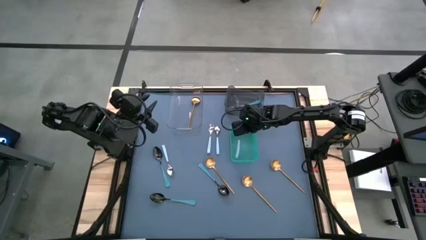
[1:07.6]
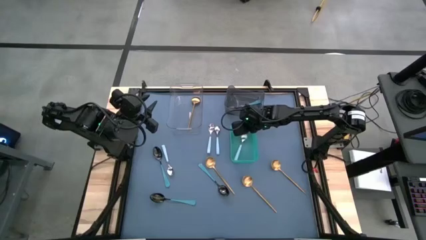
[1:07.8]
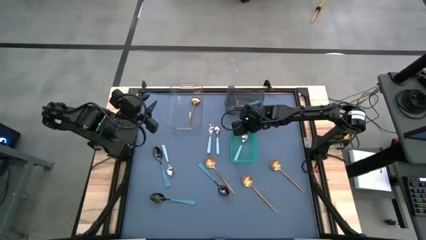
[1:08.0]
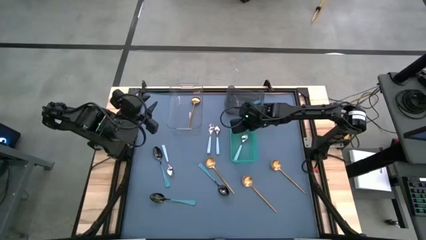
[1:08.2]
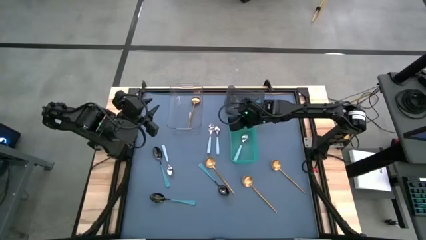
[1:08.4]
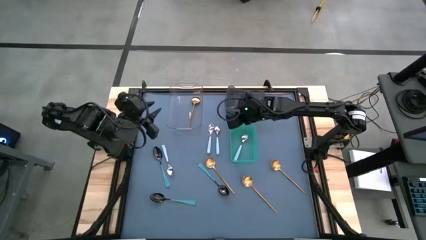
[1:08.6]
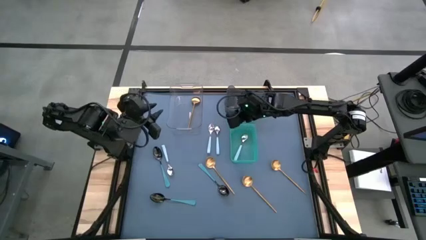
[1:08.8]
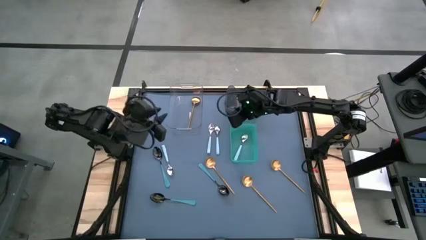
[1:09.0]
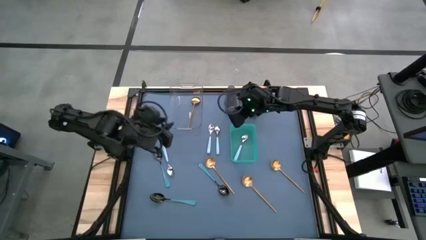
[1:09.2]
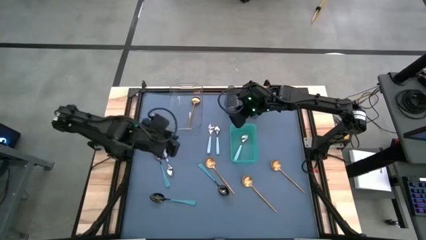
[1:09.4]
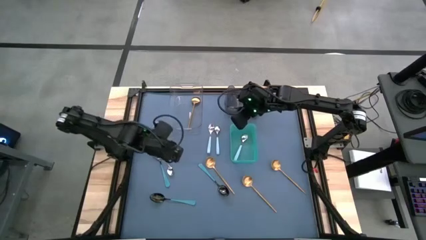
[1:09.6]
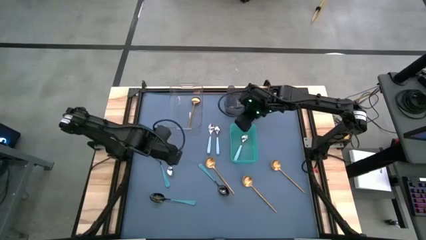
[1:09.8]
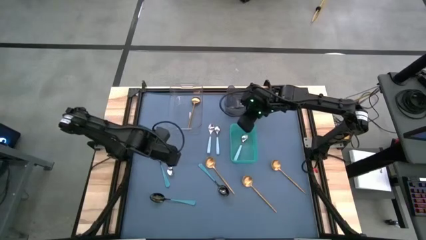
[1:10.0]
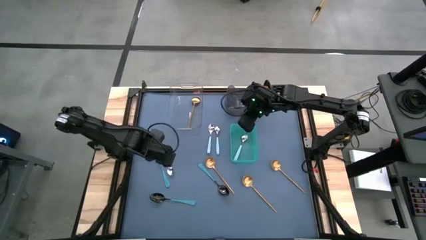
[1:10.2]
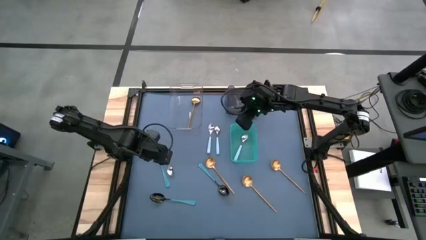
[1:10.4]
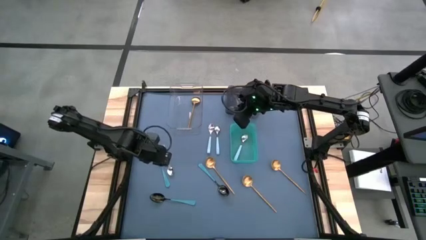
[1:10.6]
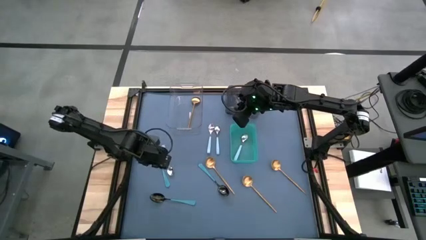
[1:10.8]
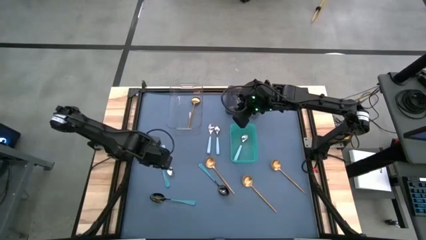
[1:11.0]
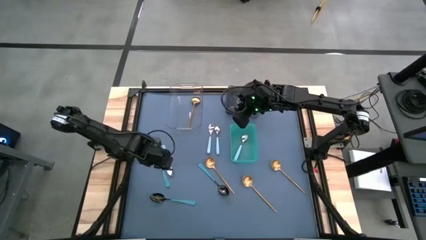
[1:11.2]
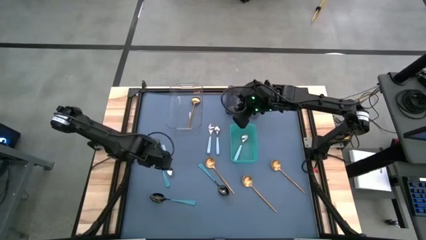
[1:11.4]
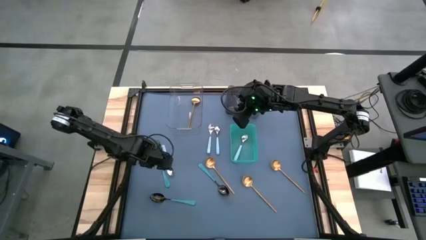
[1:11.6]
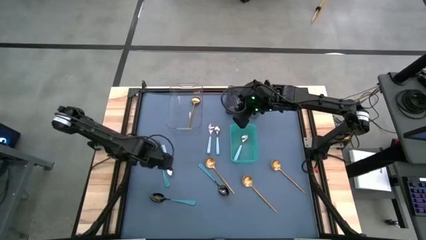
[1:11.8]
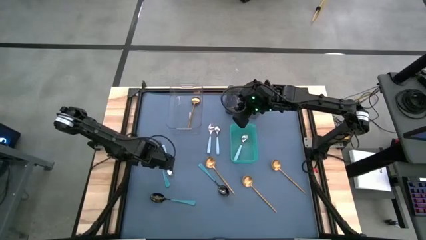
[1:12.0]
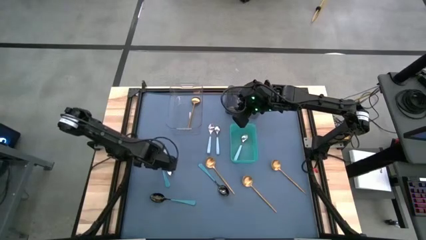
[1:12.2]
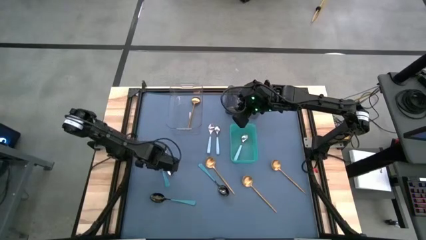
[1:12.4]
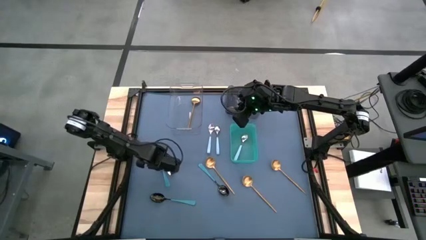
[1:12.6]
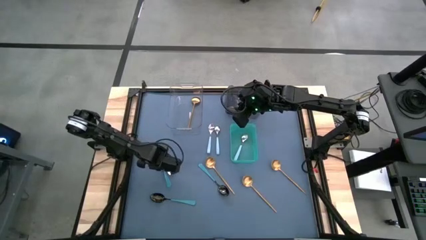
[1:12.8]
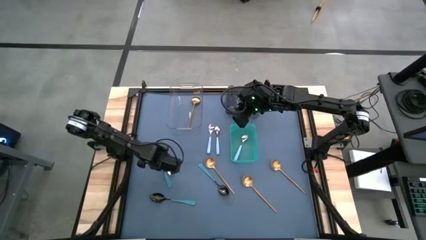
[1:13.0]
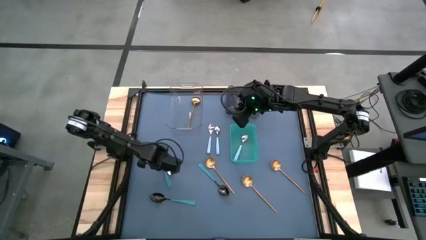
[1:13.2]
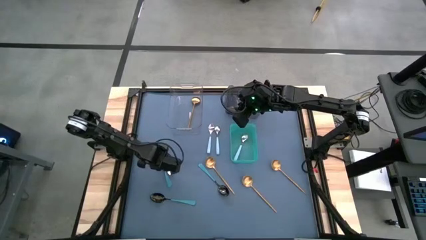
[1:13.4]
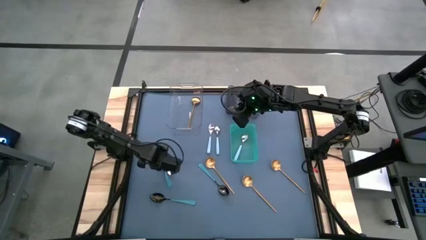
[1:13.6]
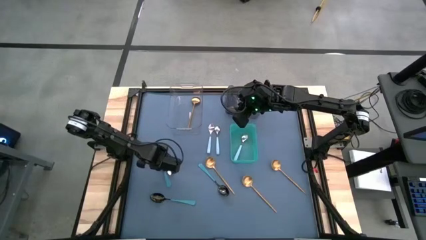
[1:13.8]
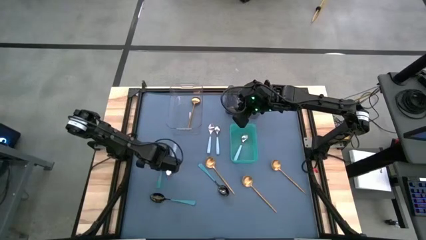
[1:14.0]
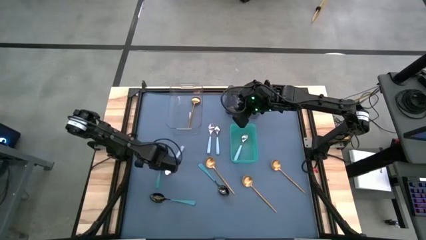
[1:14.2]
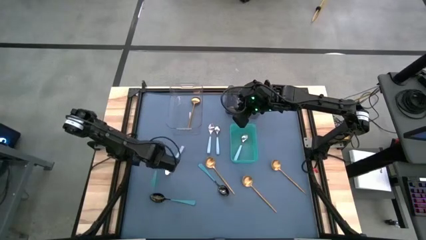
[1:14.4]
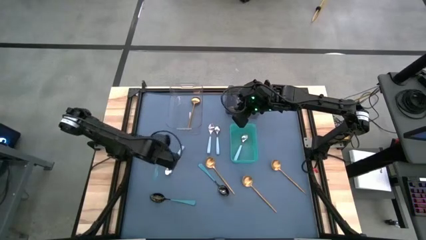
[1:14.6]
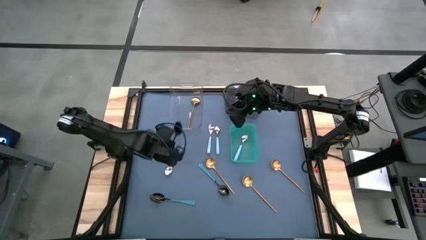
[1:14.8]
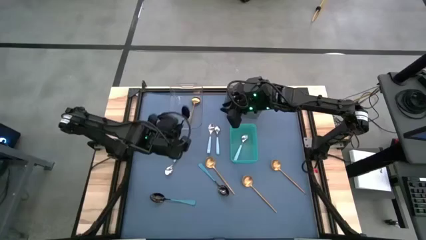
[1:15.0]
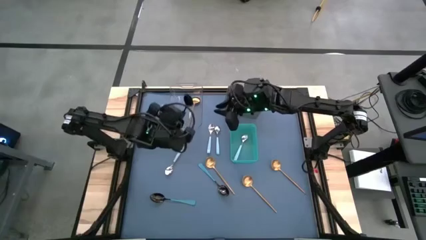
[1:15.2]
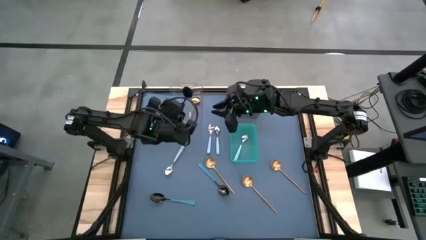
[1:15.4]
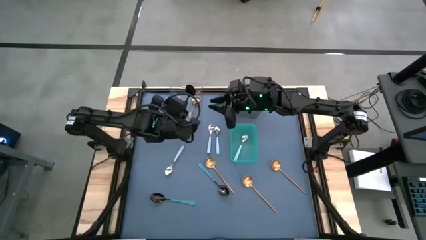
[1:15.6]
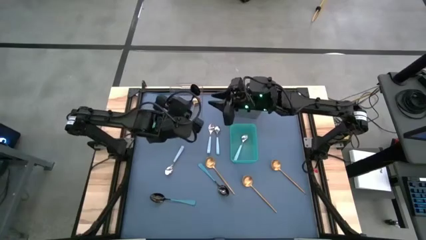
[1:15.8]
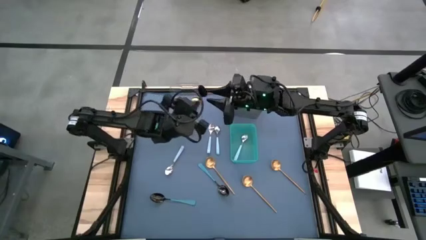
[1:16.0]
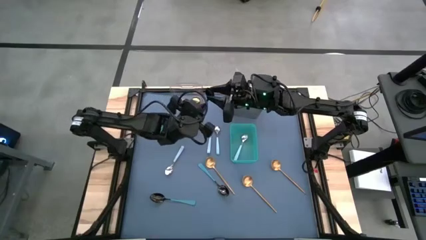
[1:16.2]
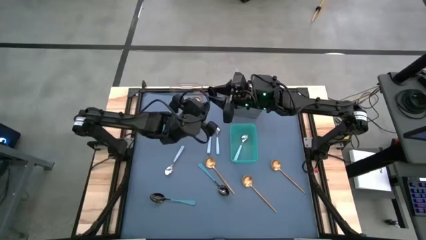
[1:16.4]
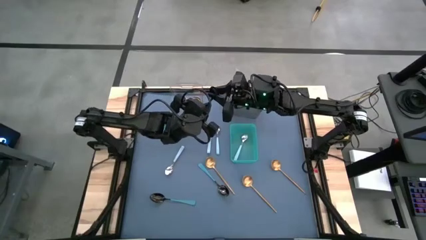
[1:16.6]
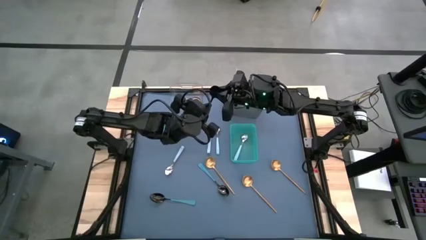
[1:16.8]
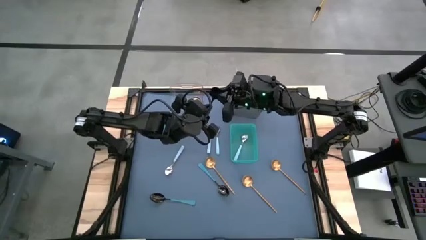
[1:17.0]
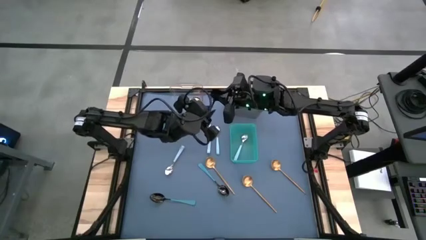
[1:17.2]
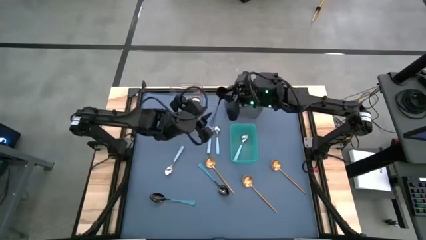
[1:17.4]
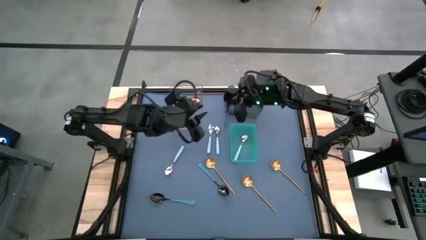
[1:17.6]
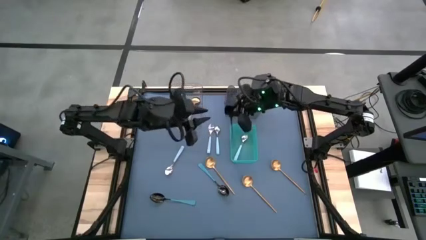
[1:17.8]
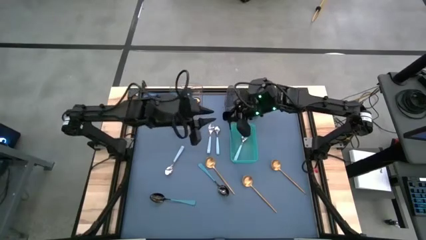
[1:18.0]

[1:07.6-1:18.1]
Task: Sort silverware by color (type)
Put the blue spoon into the black bin
